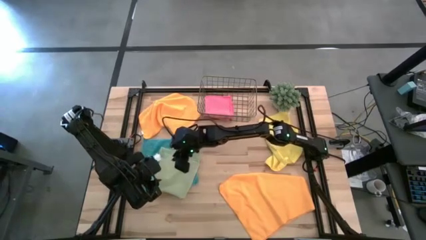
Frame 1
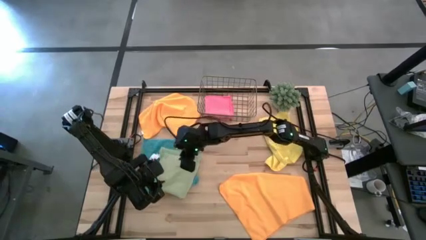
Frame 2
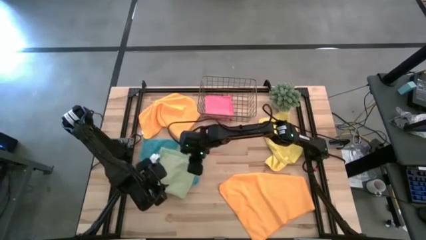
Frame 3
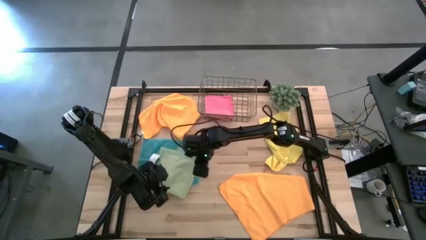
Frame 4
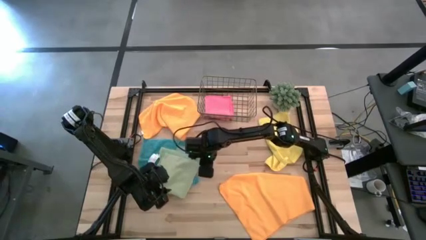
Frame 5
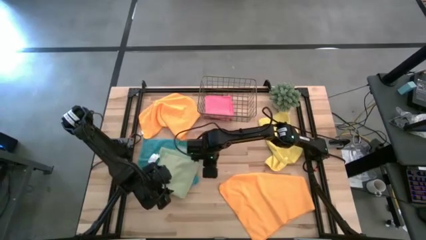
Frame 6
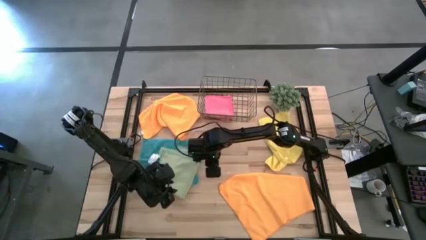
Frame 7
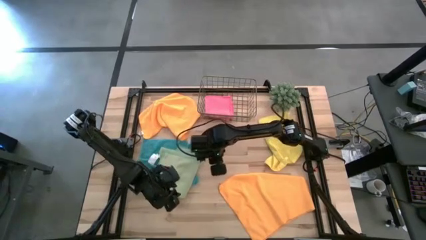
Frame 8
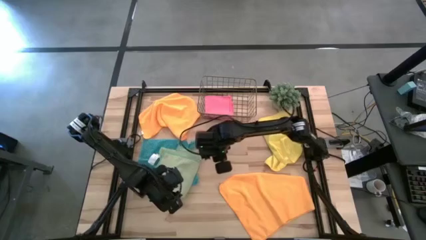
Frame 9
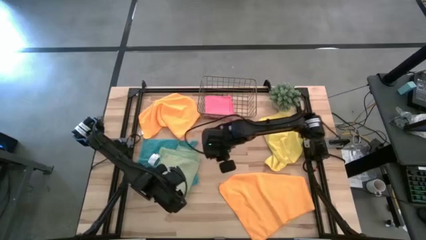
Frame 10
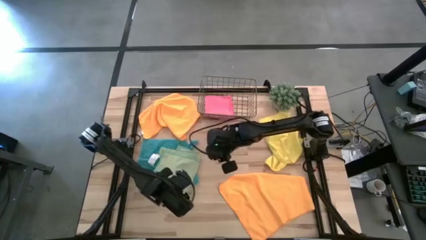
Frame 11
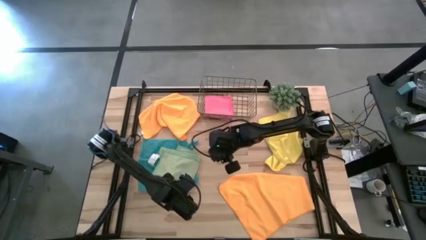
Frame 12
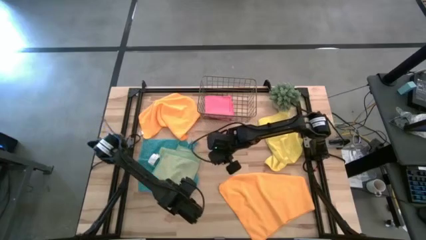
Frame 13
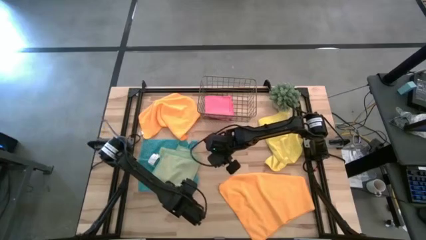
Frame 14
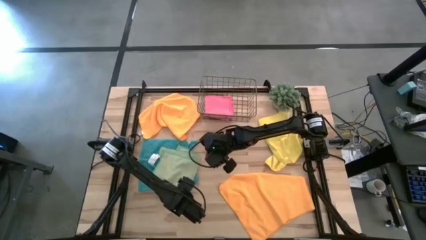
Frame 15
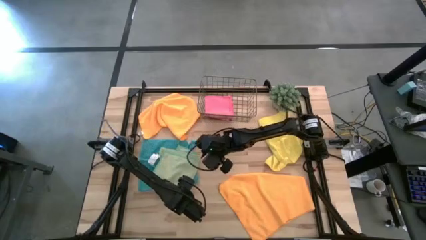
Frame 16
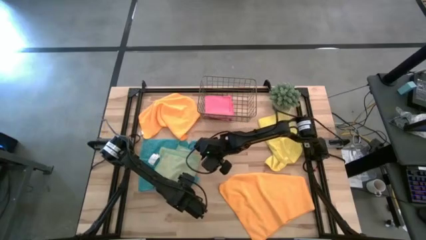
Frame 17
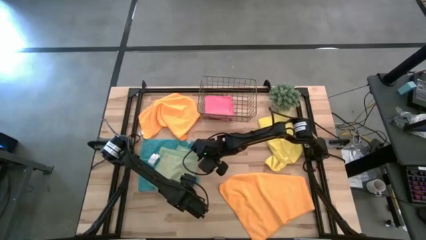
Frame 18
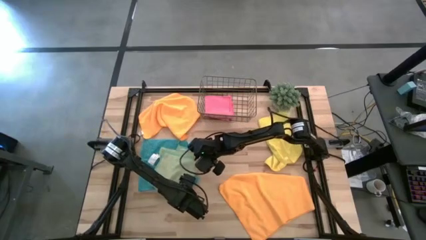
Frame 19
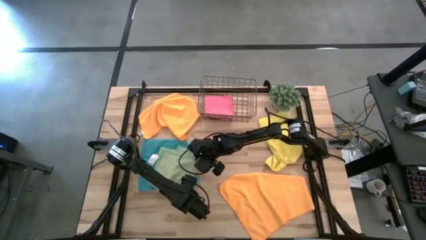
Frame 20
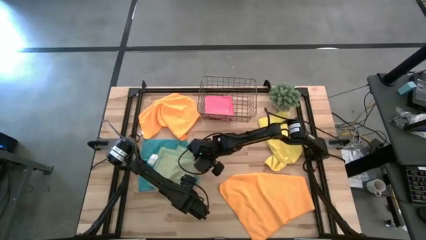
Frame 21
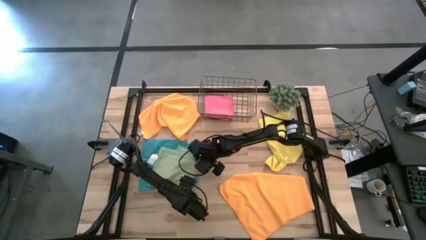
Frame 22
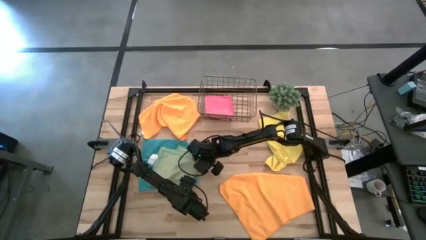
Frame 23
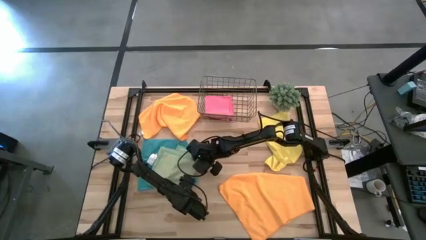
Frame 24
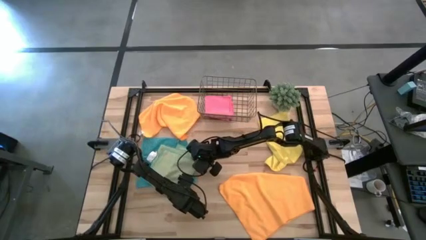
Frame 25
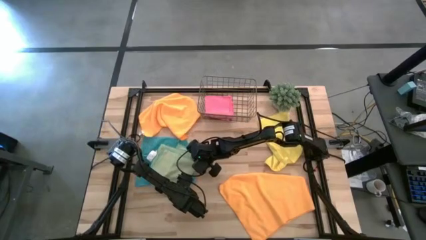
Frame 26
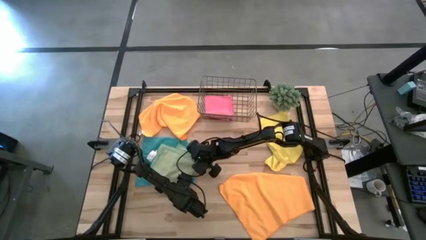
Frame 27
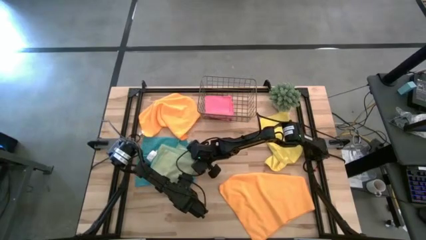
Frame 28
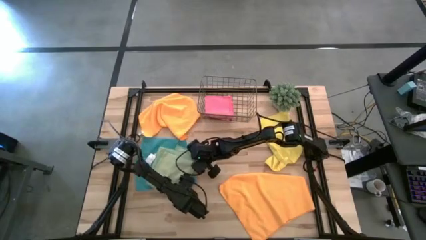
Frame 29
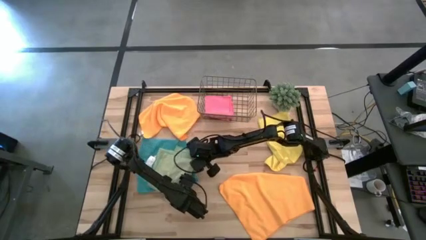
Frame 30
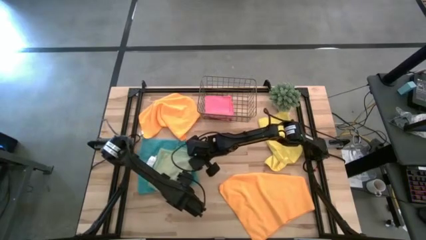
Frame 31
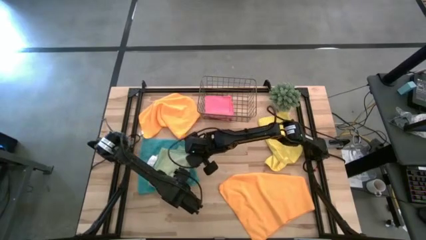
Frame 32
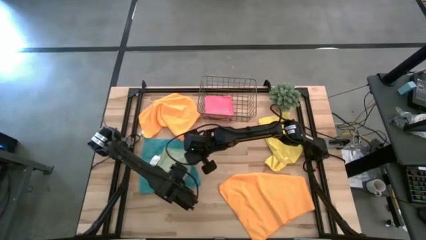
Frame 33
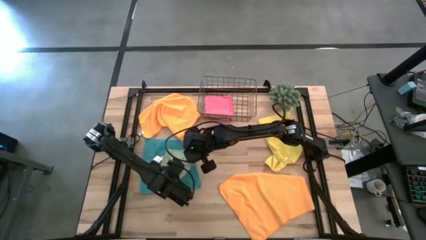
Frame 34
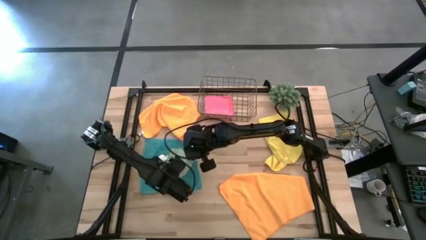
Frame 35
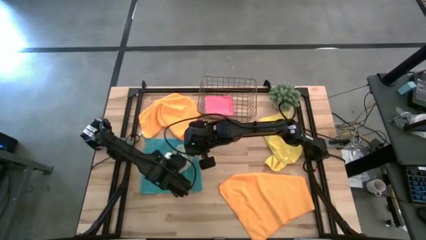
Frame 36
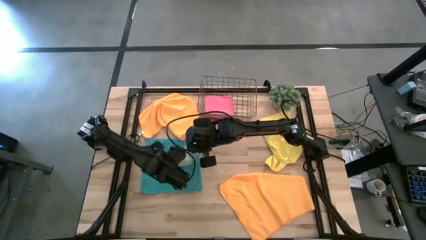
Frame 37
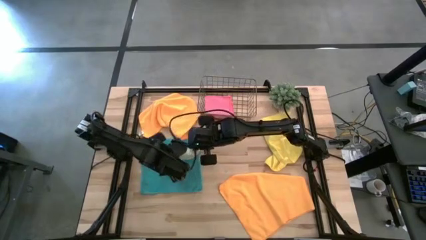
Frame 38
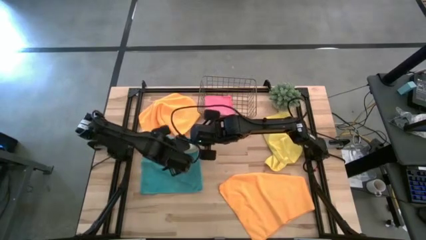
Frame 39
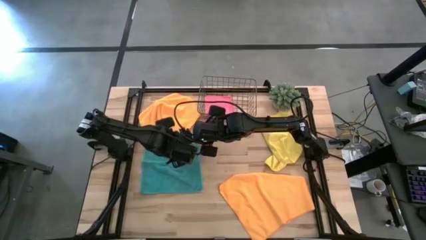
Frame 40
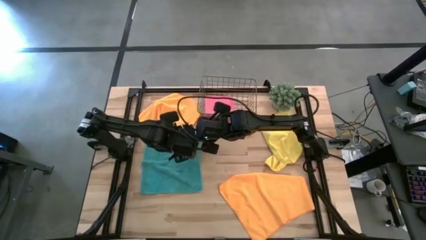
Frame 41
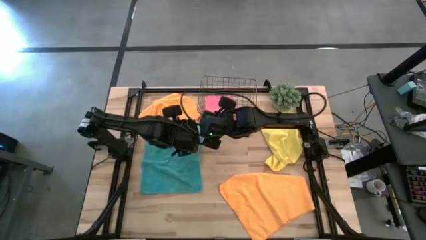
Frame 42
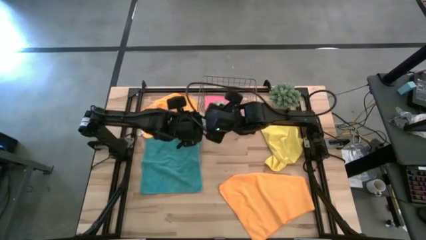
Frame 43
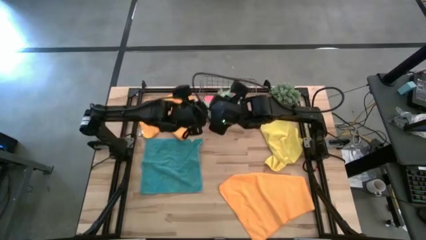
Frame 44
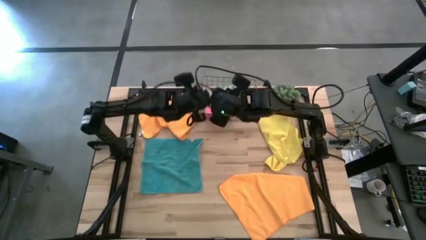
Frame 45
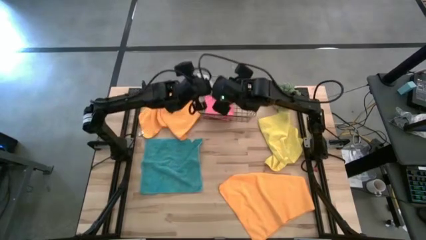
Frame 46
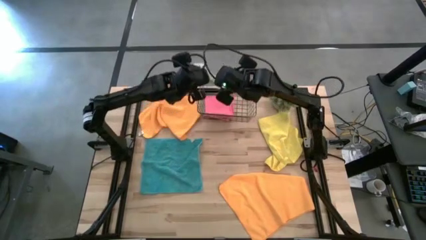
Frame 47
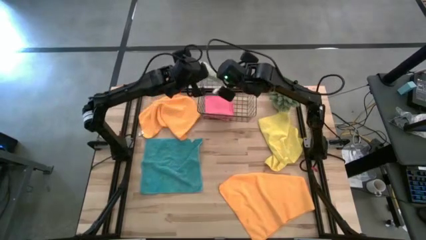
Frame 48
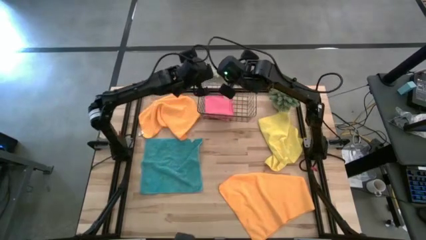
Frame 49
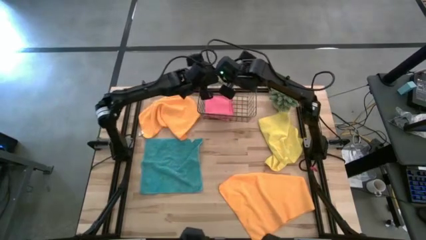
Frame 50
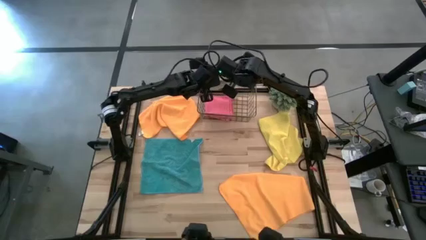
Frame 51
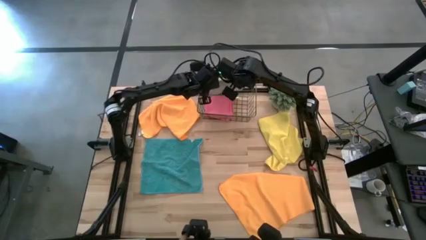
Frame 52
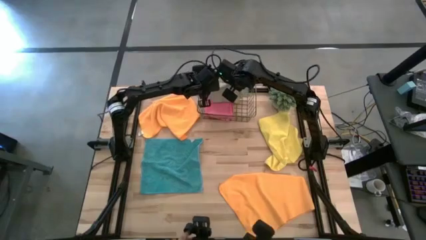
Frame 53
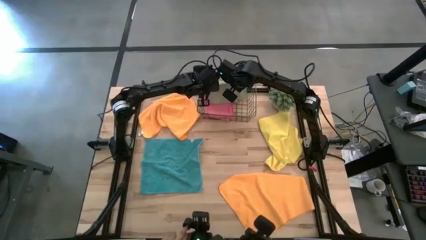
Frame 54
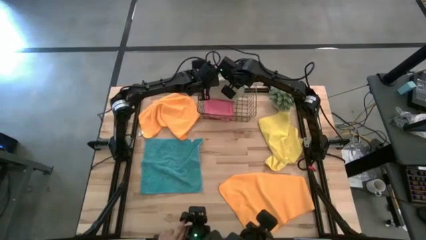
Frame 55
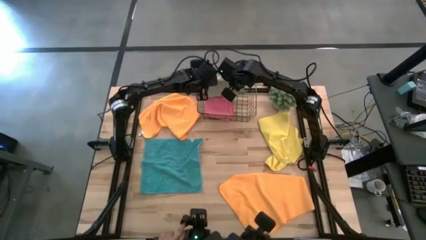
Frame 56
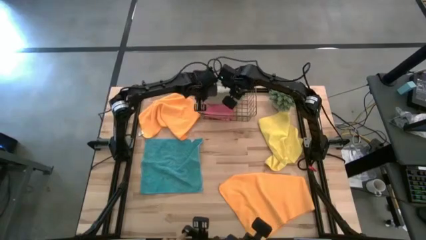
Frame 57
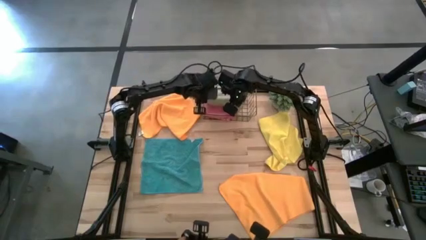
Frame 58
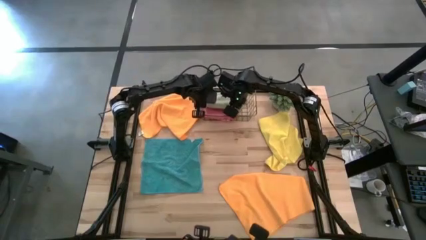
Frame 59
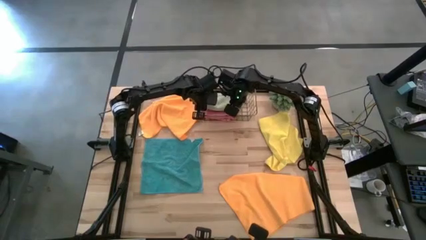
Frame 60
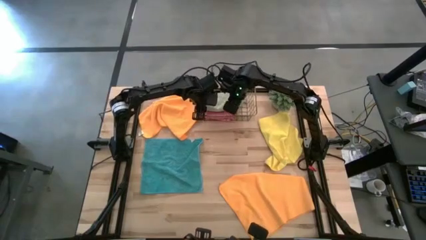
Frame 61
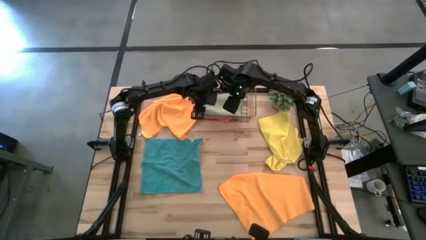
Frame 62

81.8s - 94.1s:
Task: Fold microfiber towels
Stack the folded green microfiber cloth on top of the folded pink microfiber cloth

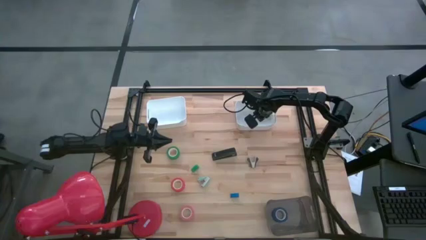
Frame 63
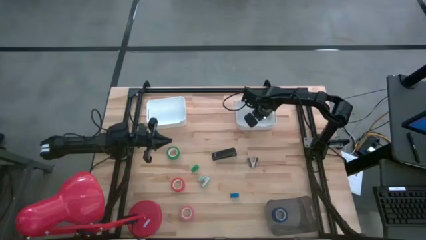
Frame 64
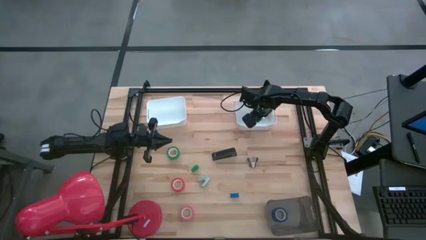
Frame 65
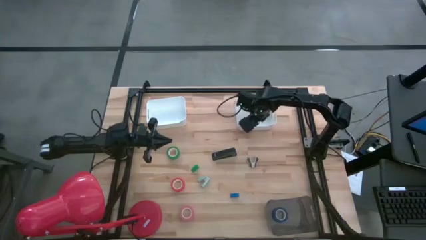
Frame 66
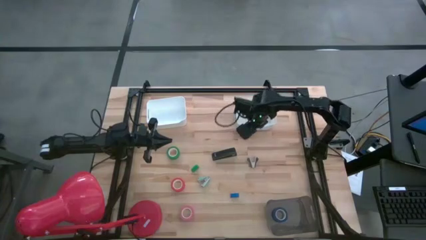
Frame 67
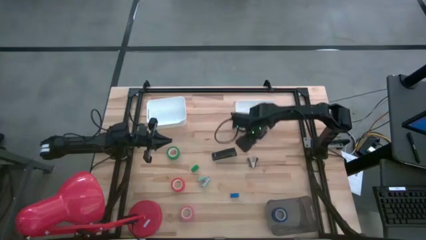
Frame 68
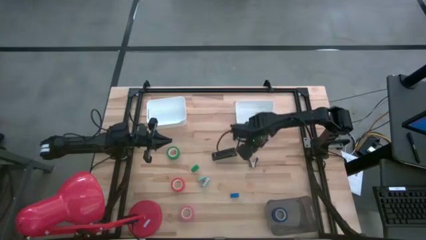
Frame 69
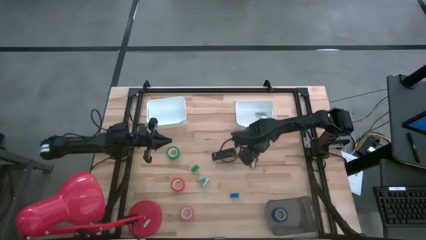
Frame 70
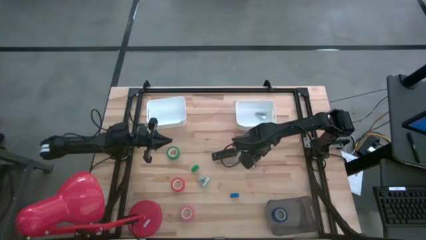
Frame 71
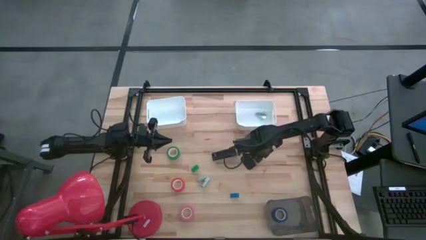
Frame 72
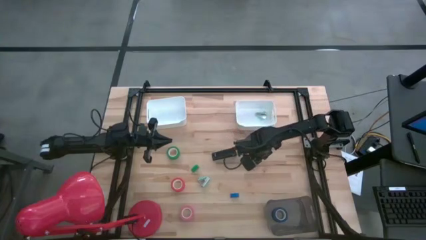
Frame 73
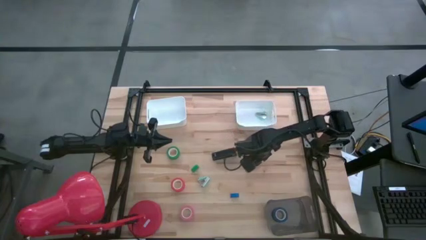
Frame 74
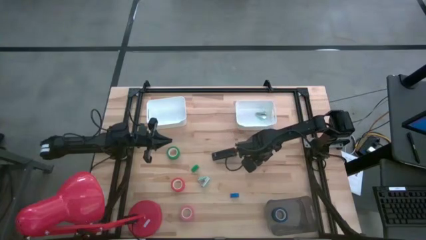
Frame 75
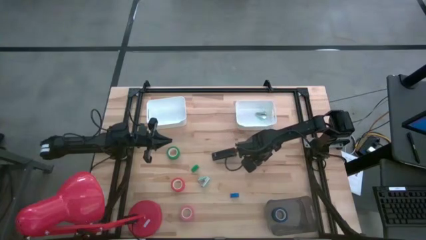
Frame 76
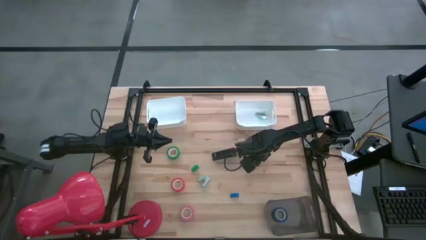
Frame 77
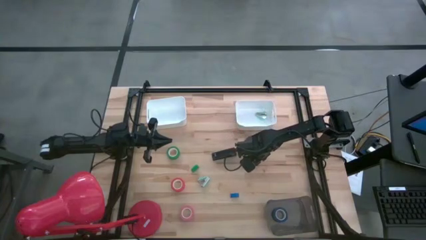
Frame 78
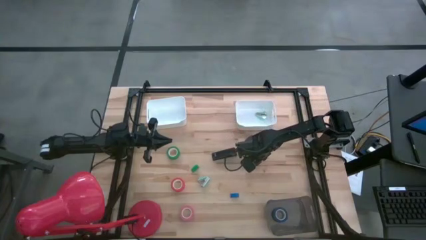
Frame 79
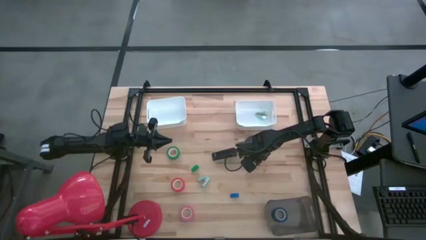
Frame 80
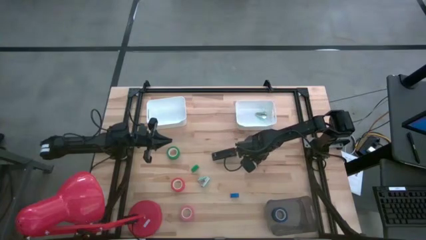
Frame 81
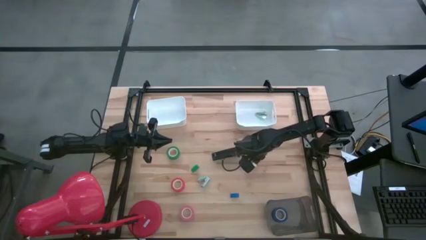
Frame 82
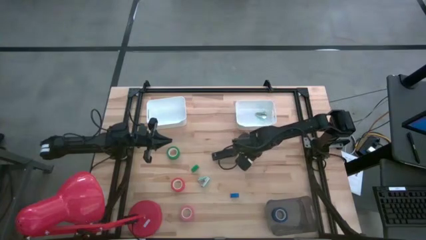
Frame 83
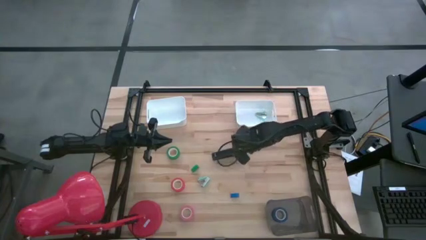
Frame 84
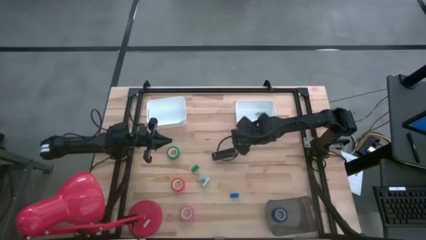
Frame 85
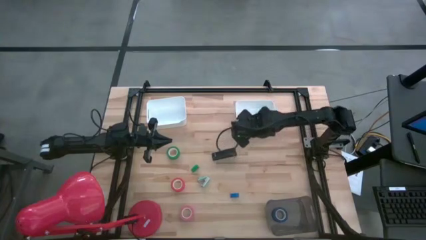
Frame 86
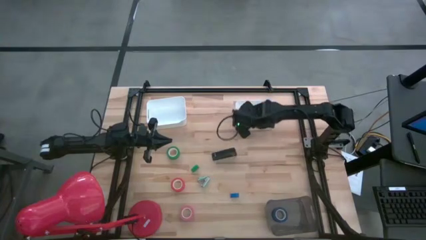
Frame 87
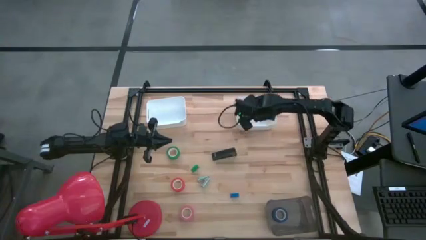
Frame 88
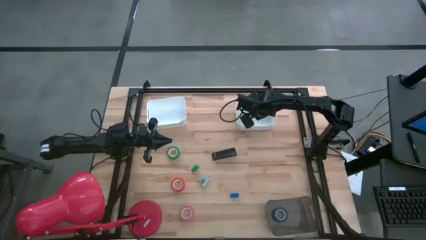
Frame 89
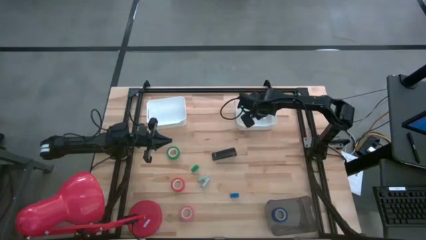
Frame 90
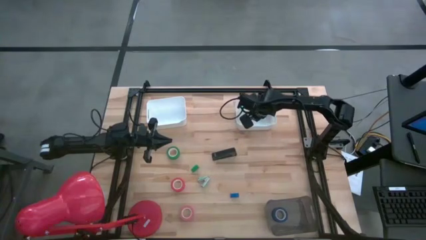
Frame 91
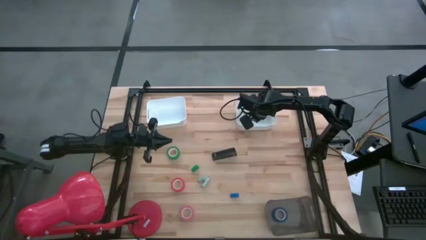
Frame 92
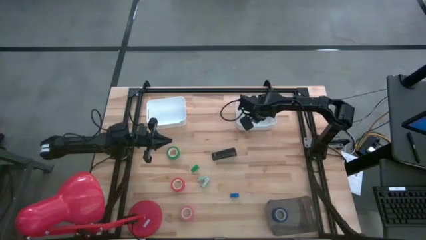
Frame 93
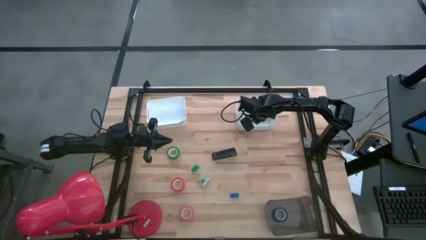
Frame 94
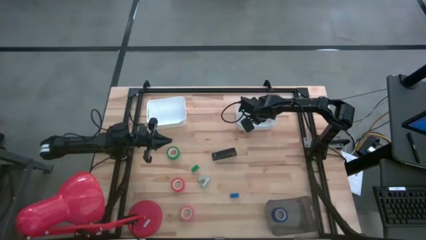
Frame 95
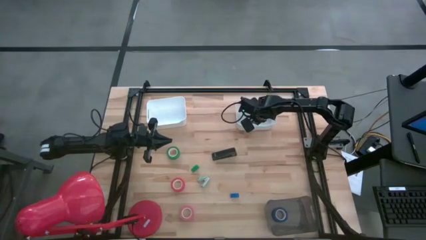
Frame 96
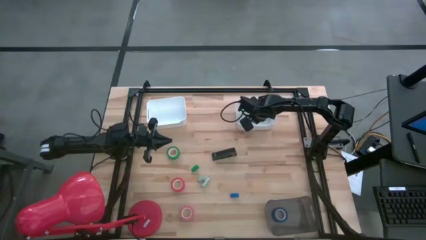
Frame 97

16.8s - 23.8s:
Task: Pick and place Stapler, Stapler remover, tape
Put the black staple remover into the right white bin
